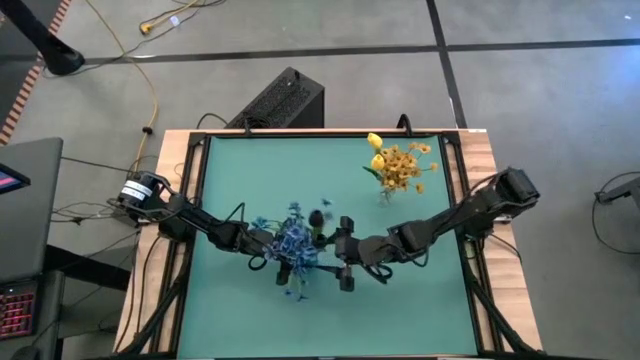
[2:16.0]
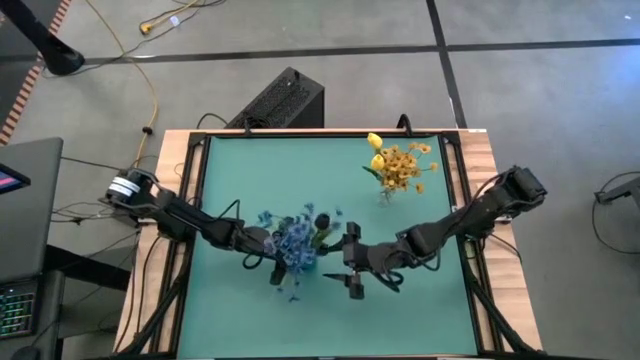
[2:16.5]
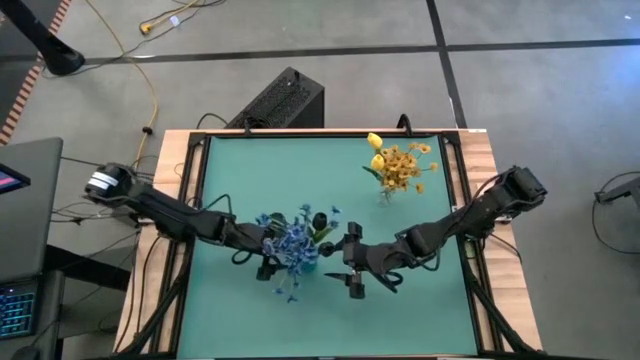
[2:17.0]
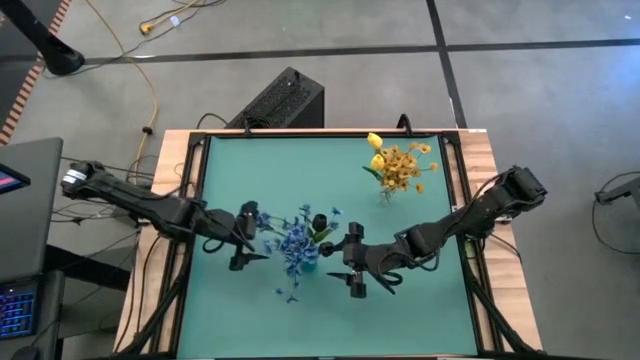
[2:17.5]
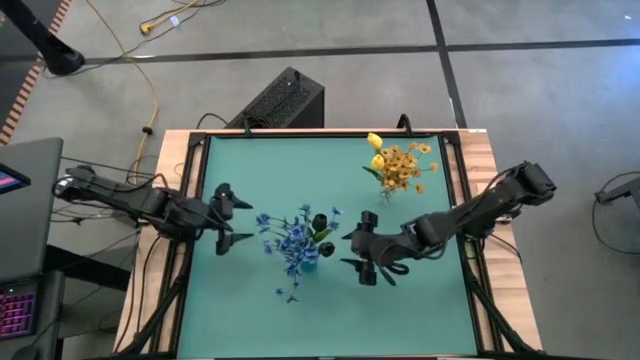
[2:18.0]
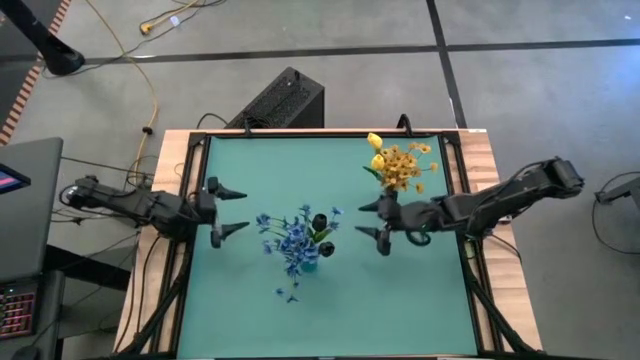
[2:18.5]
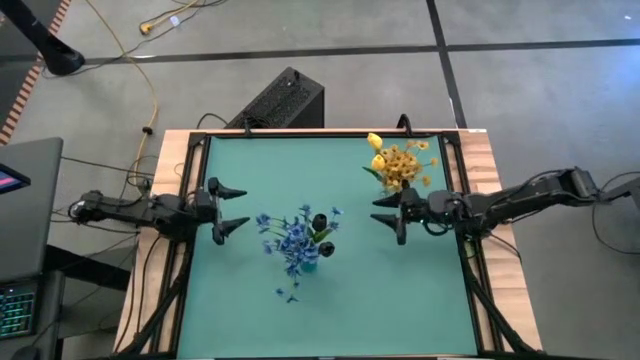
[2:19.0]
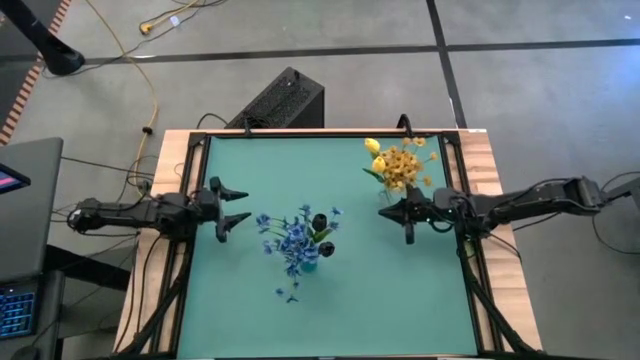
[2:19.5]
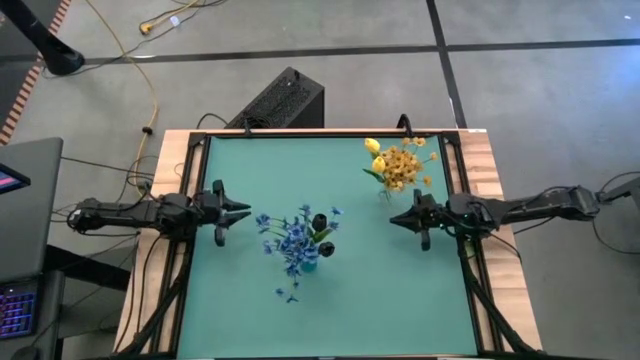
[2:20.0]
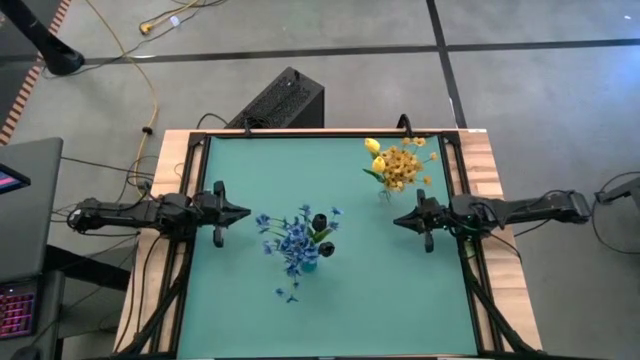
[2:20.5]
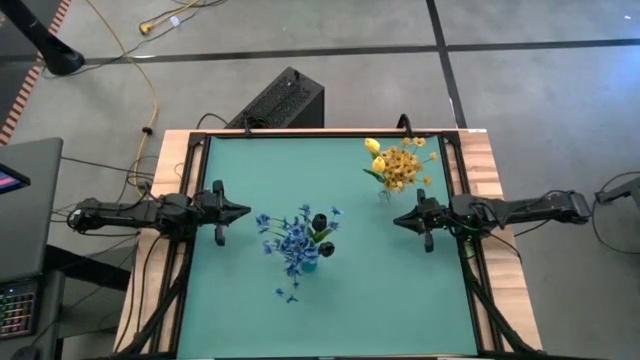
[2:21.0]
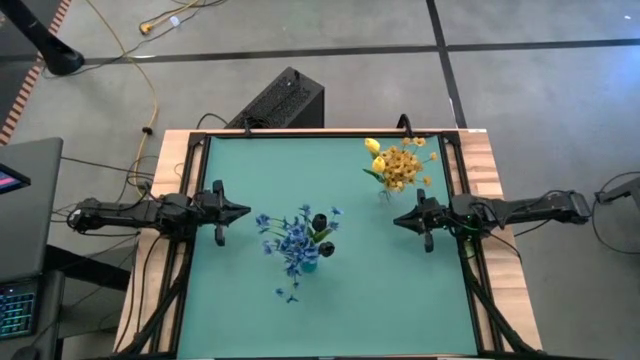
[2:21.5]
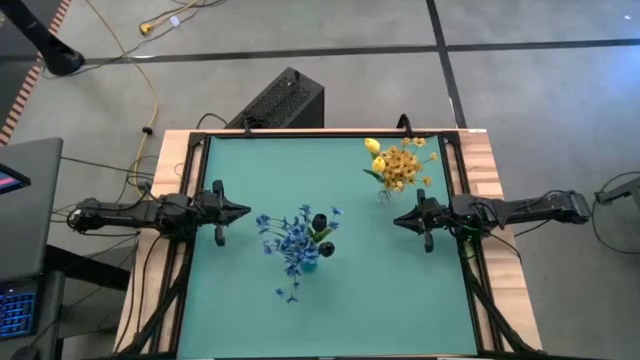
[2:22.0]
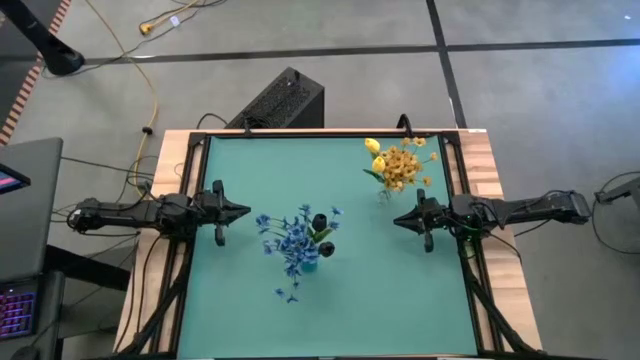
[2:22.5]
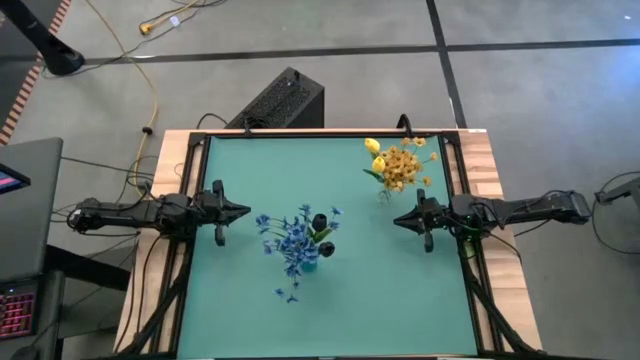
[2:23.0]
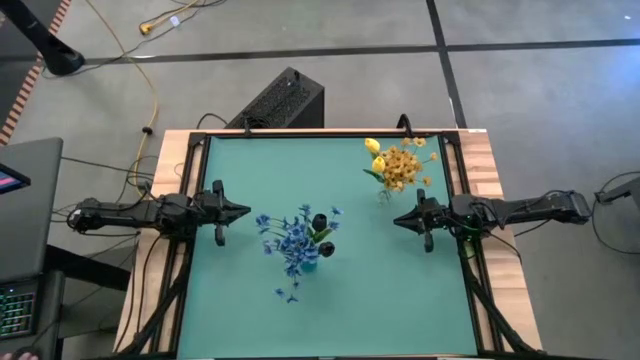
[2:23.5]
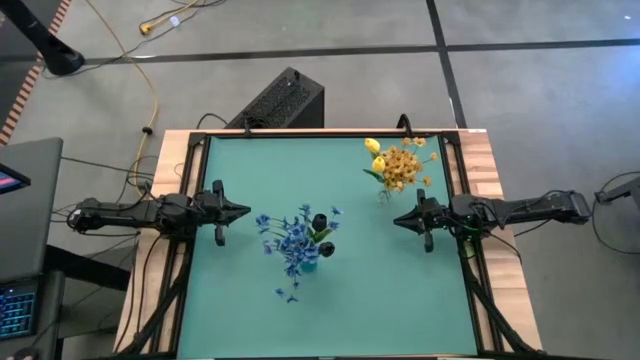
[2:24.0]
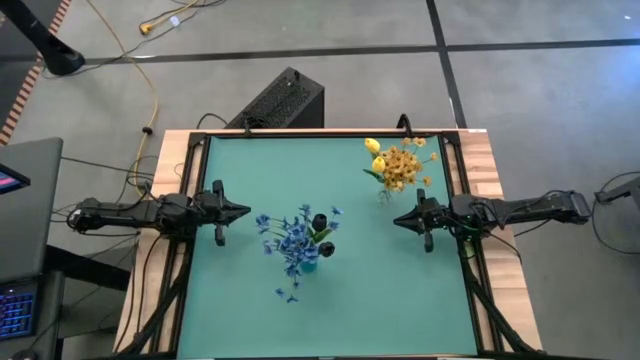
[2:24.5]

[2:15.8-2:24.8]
Task: Sort flowers into vase by color
Return to home Position

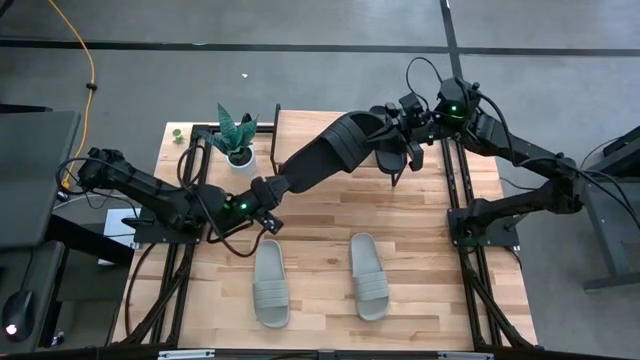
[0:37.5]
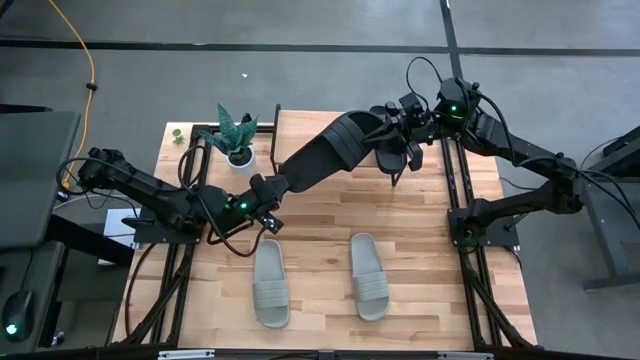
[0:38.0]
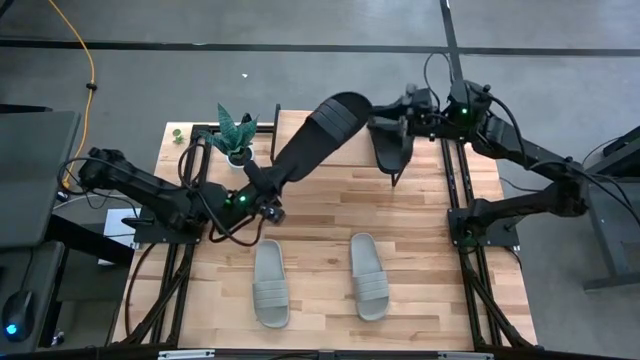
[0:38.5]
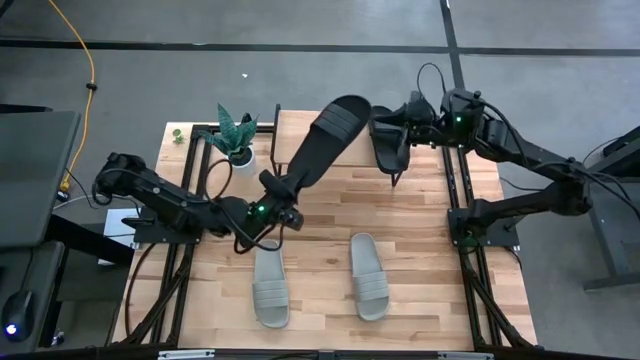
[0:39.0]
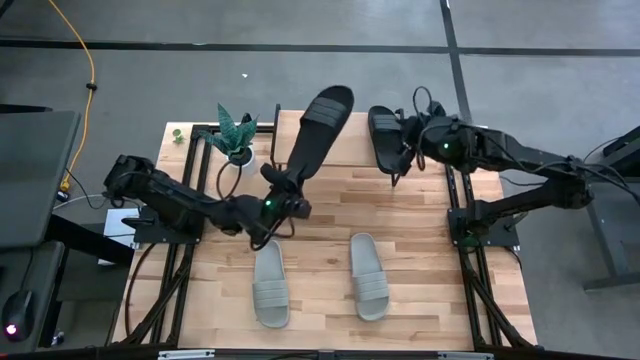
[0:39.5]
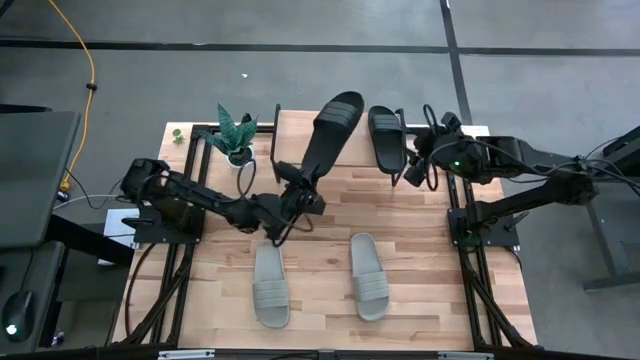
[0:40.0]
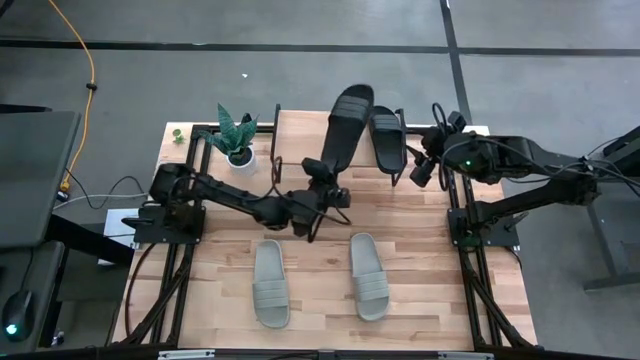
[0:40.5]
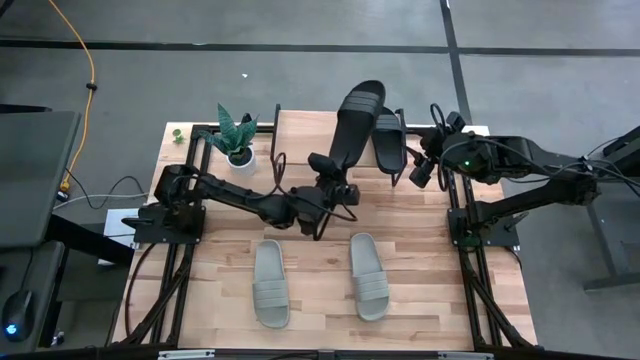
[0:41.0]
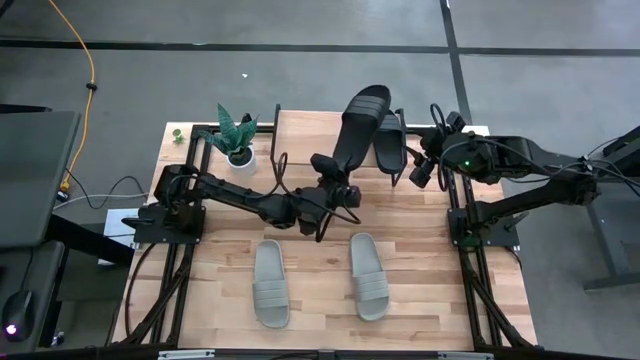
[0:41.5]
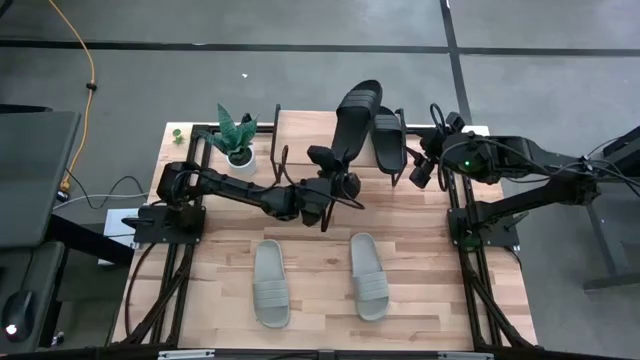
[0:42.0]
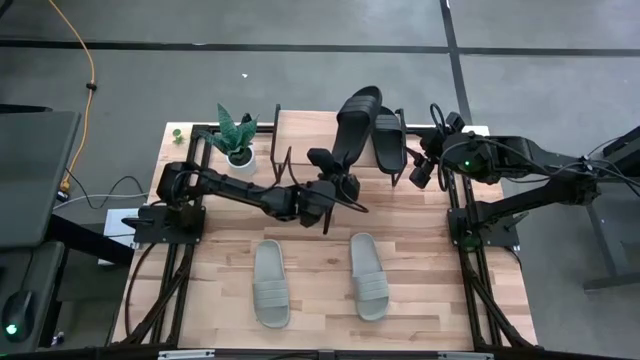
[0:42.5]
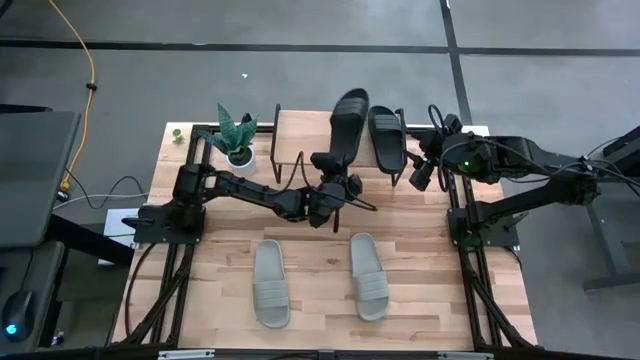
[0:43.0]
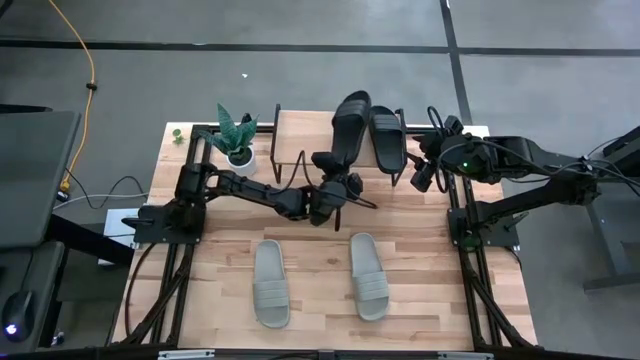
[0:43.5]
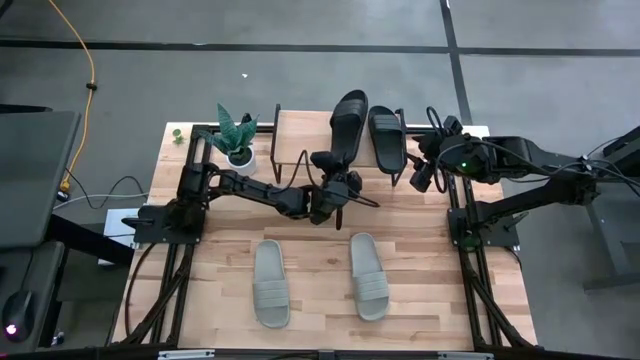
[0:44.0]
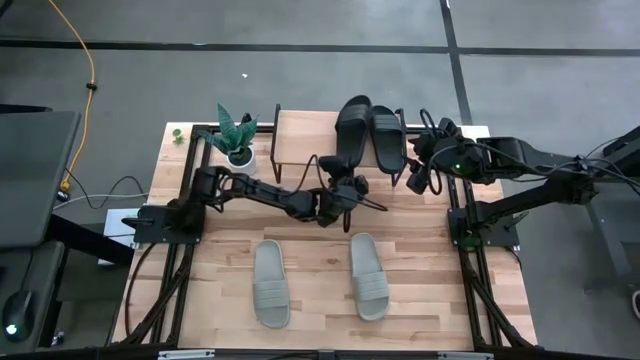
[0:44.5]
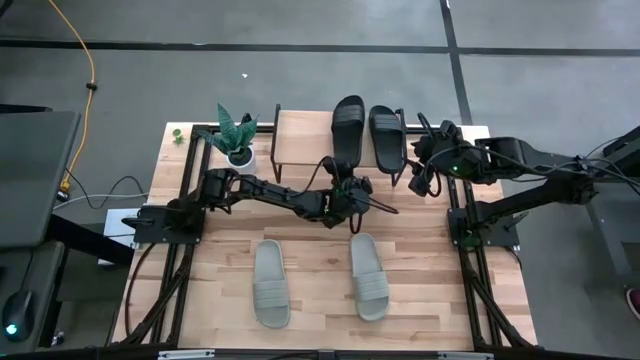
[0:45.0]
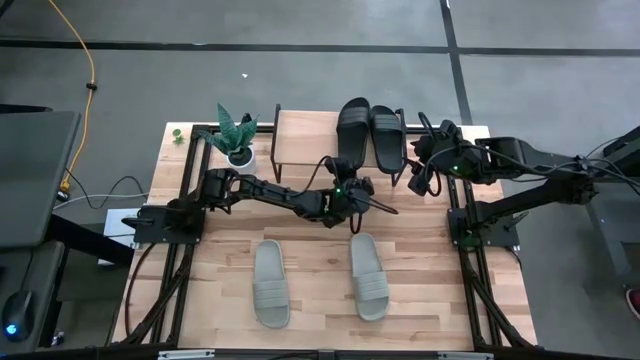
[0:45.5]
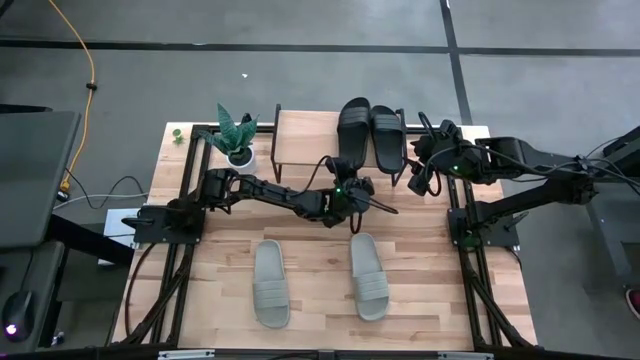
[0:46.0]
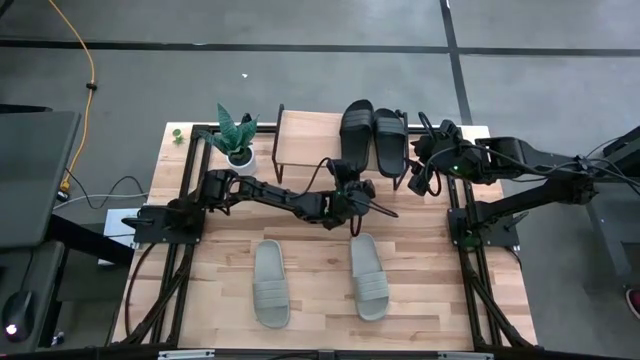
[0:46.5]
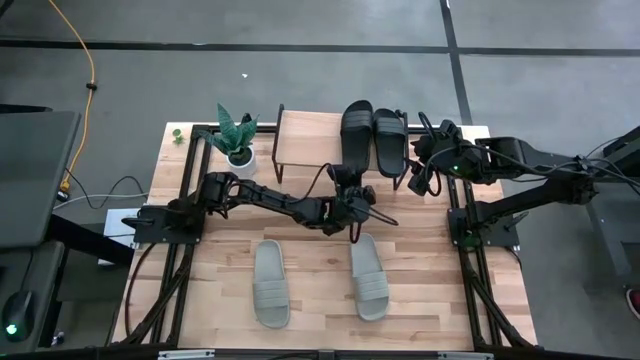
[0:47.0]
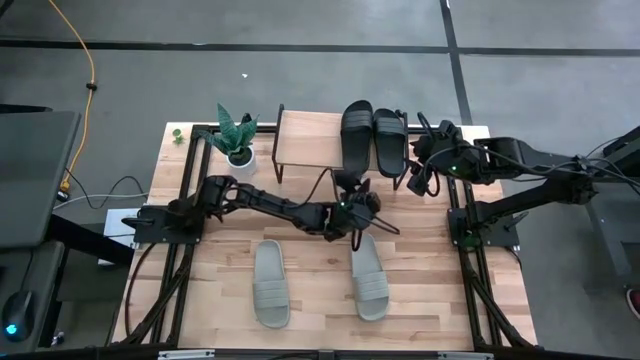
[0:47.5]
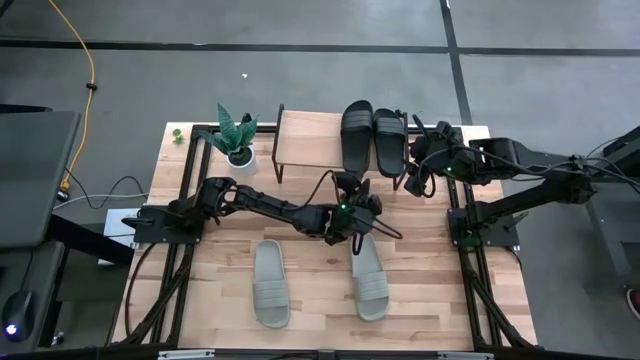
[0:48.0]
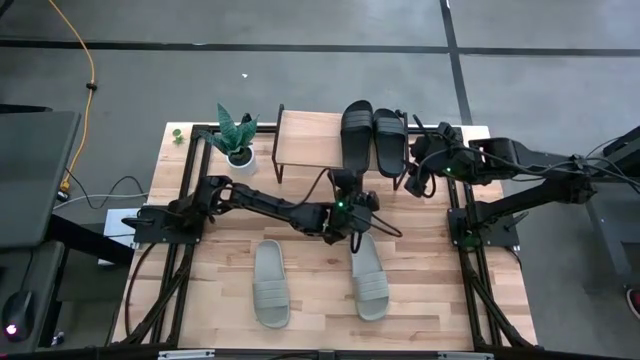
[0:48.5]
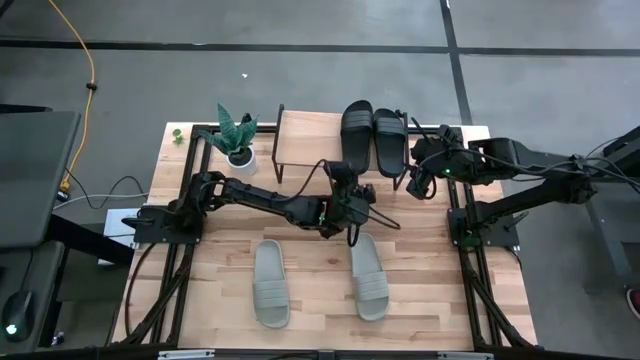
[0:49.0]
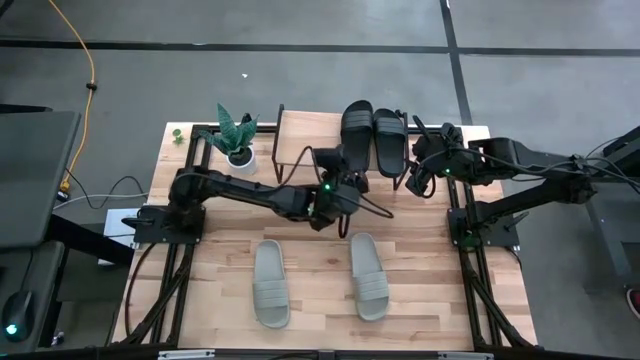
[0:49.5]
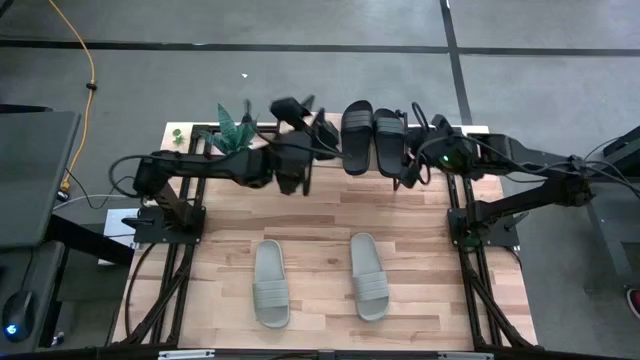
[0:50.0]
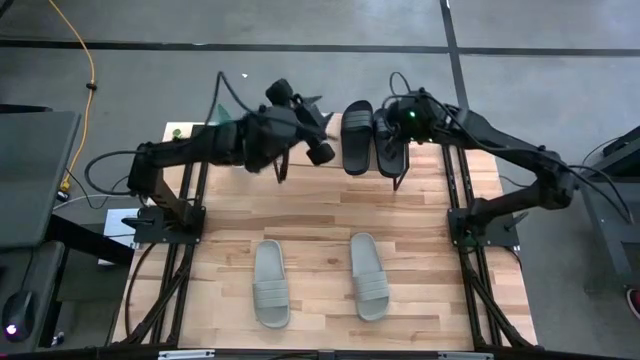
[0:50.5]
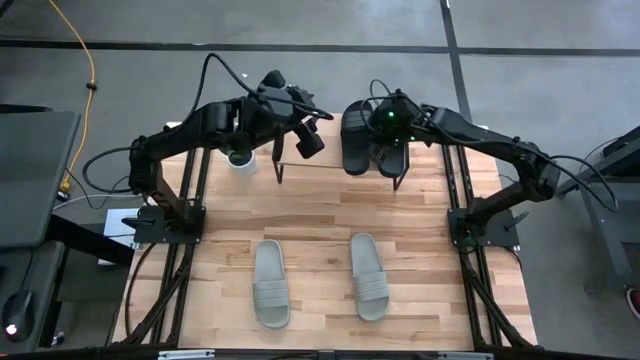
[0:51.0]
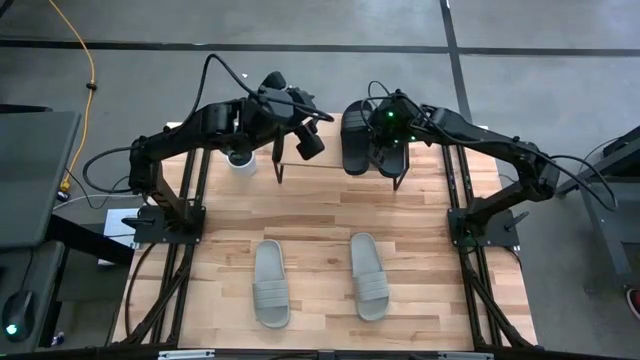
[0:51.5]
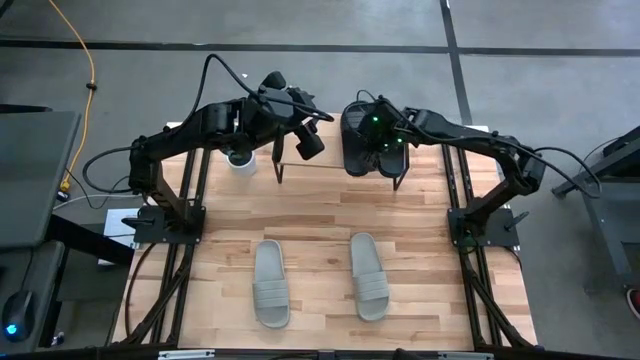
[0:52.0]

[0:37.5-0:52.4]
Task: Pick and place slides into the shelf
Put the black slide on the shelf
